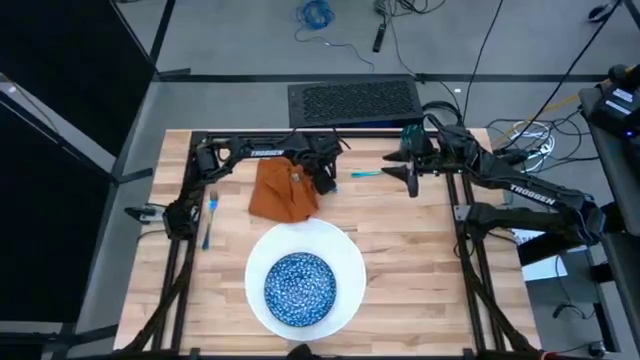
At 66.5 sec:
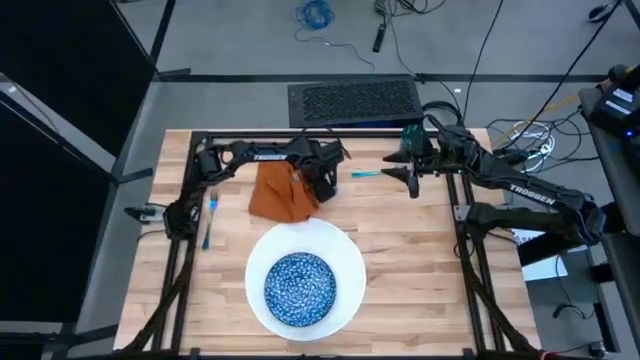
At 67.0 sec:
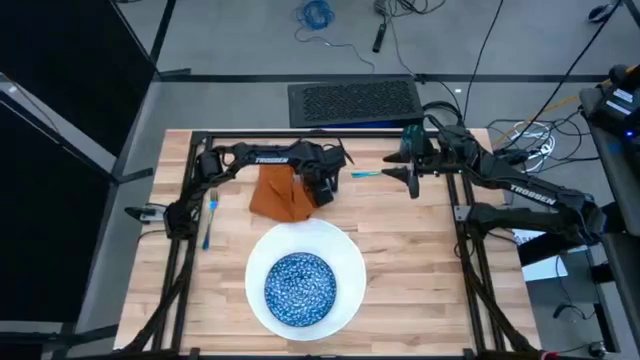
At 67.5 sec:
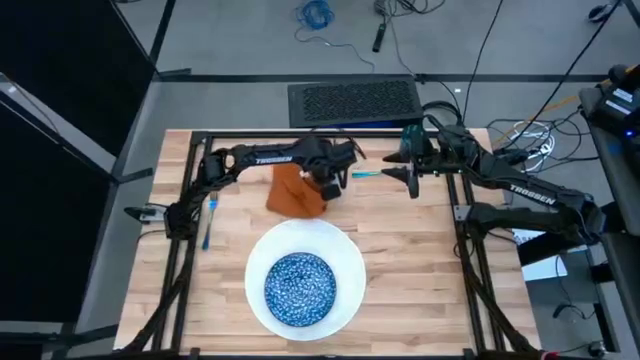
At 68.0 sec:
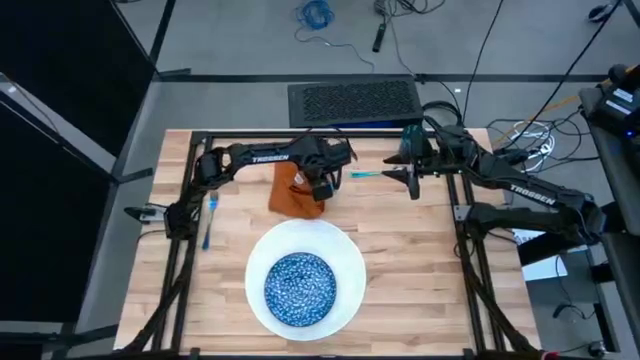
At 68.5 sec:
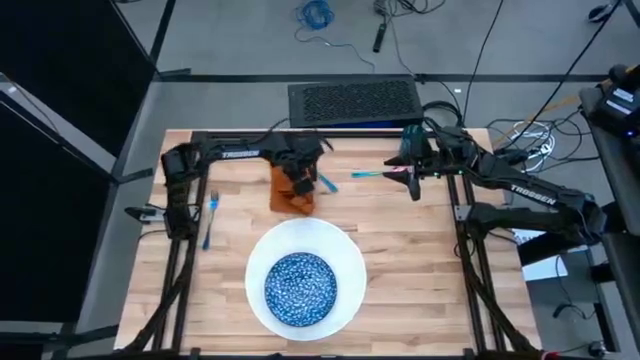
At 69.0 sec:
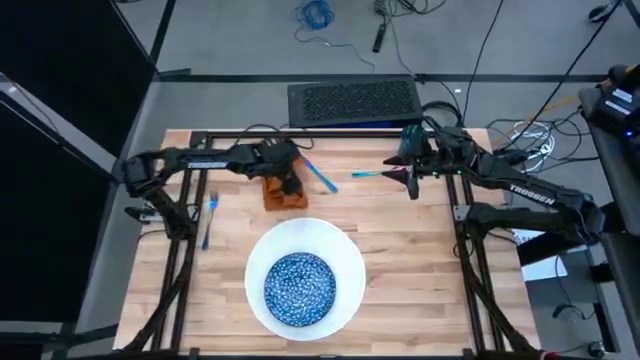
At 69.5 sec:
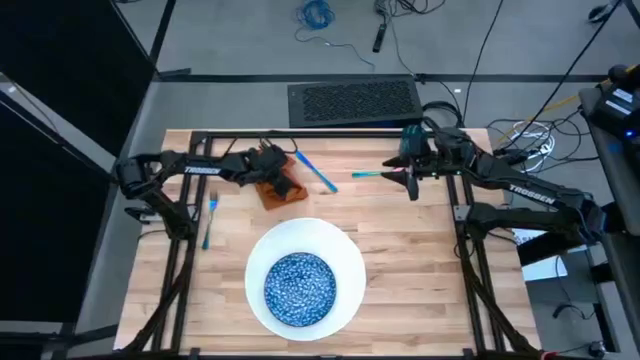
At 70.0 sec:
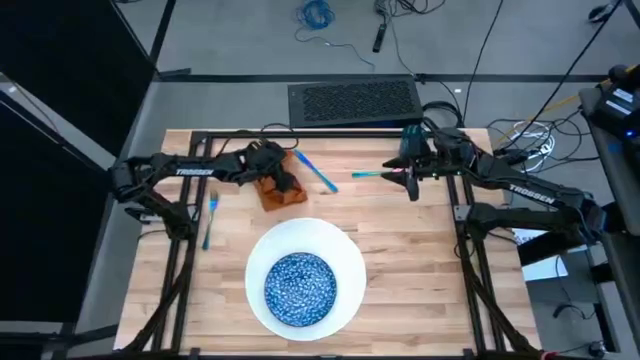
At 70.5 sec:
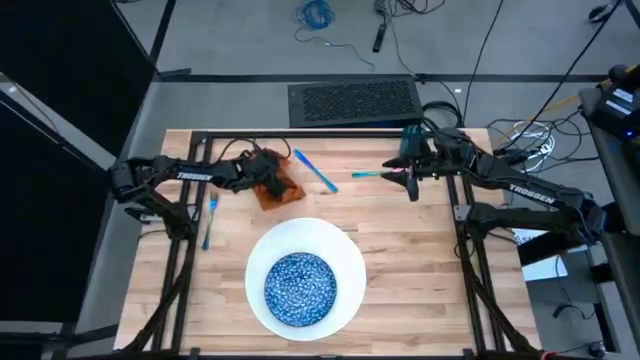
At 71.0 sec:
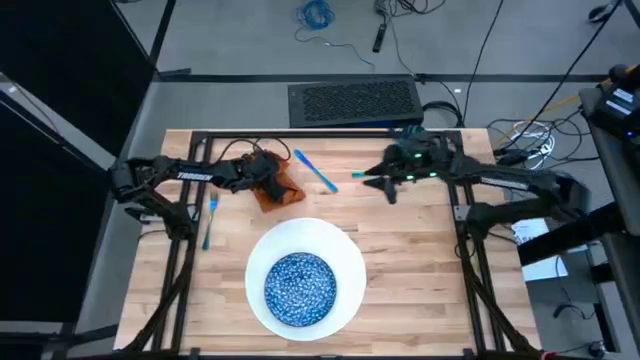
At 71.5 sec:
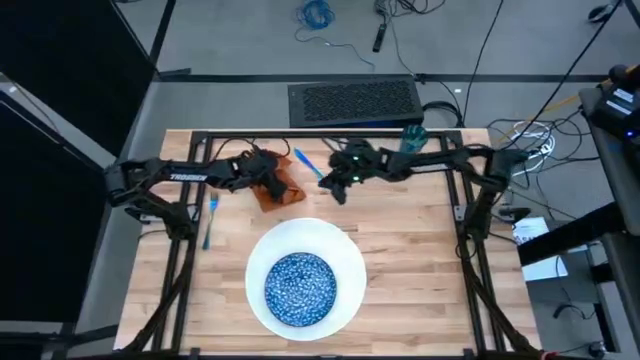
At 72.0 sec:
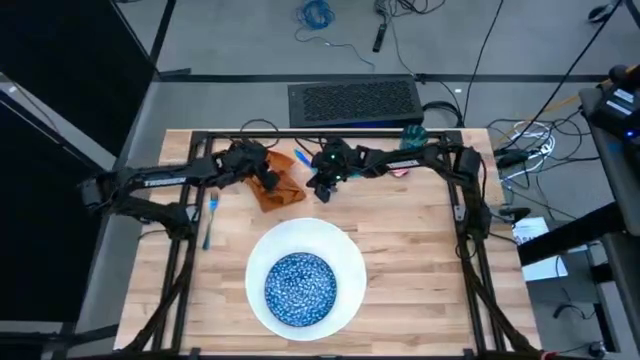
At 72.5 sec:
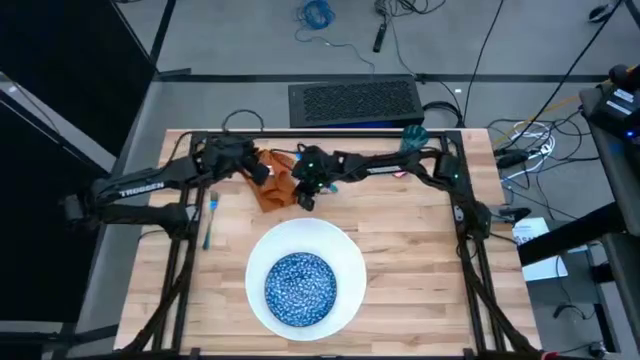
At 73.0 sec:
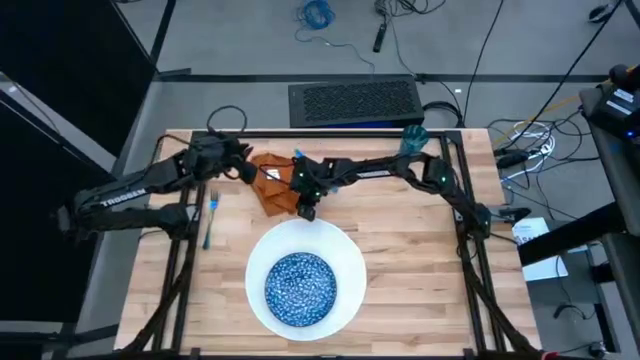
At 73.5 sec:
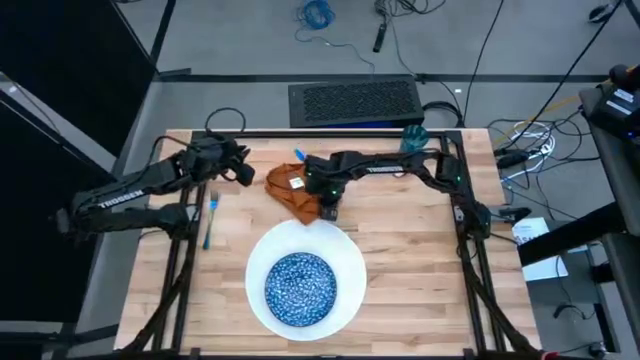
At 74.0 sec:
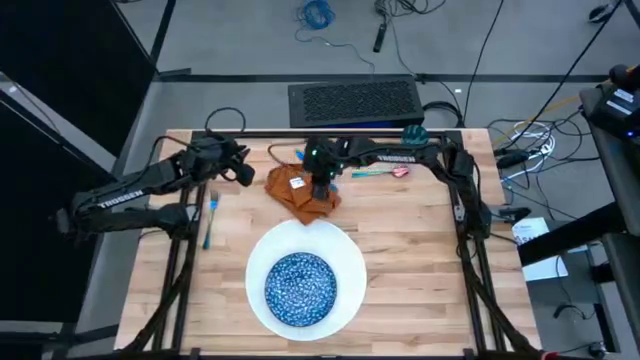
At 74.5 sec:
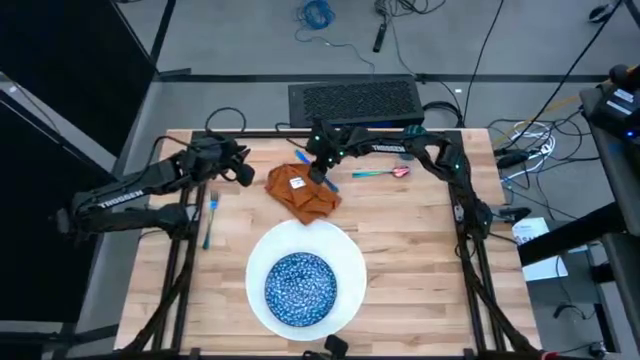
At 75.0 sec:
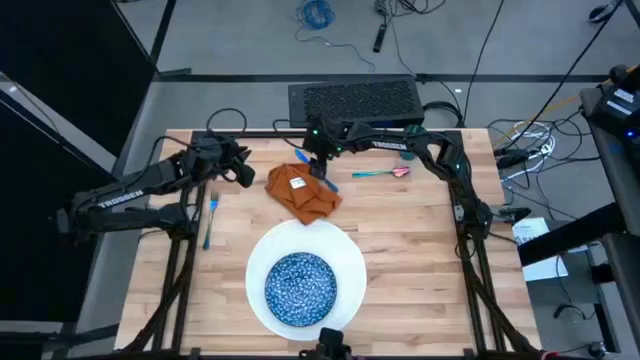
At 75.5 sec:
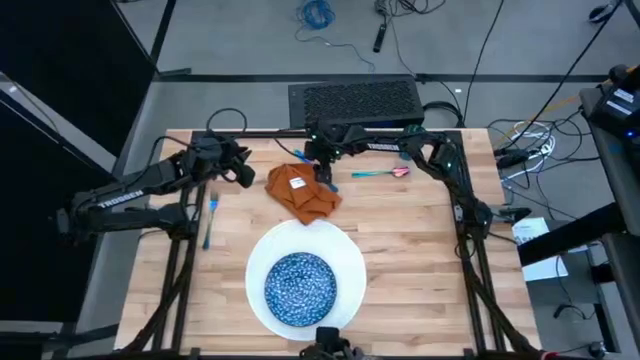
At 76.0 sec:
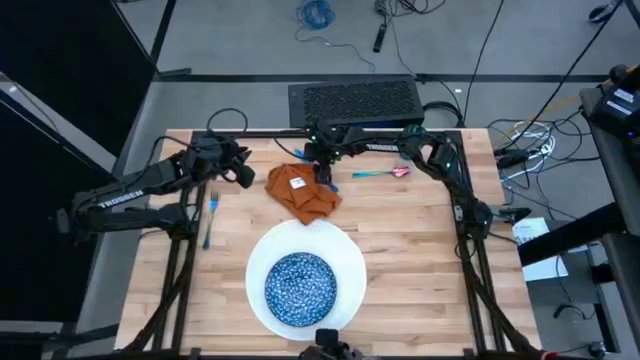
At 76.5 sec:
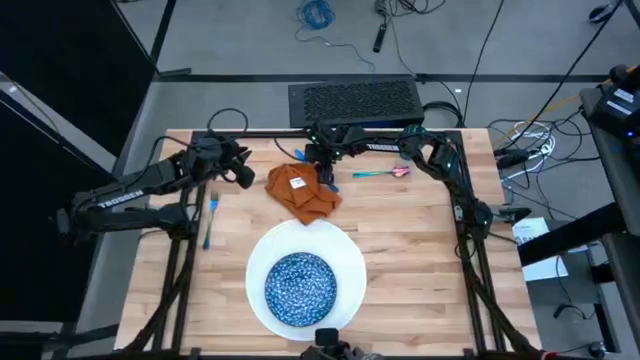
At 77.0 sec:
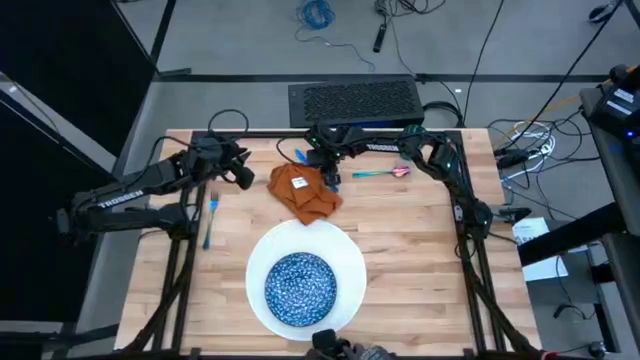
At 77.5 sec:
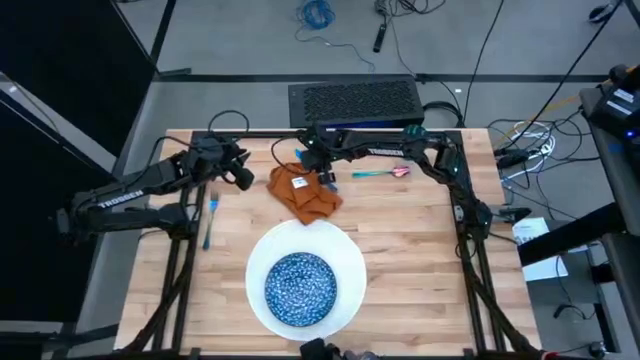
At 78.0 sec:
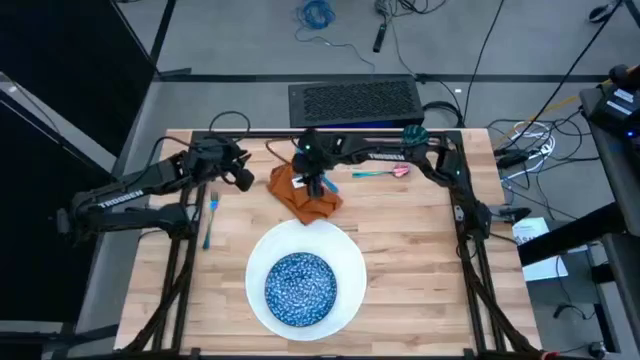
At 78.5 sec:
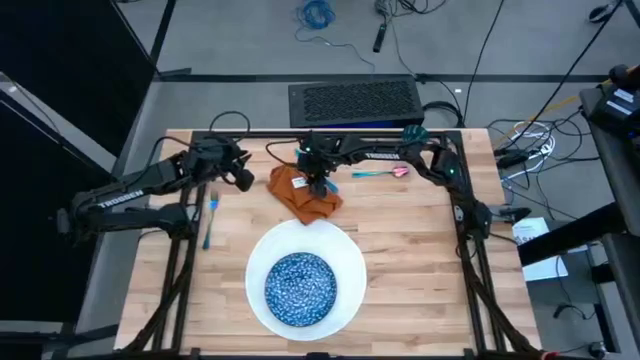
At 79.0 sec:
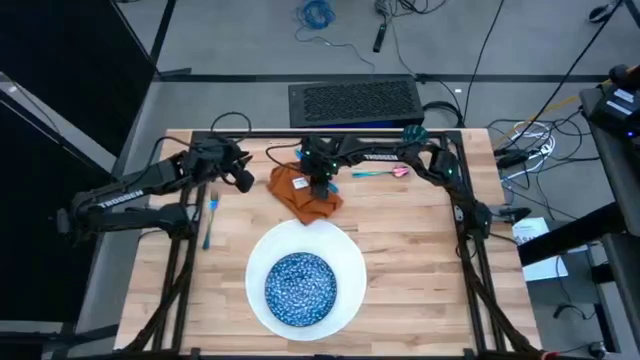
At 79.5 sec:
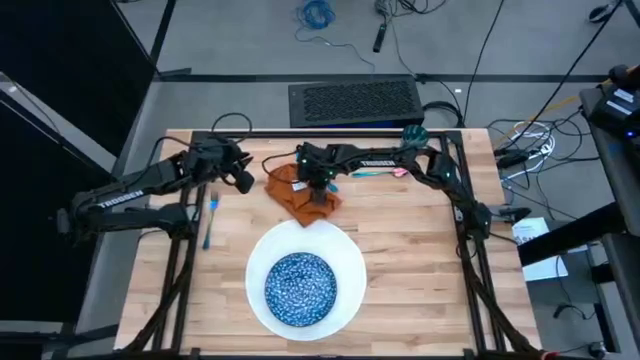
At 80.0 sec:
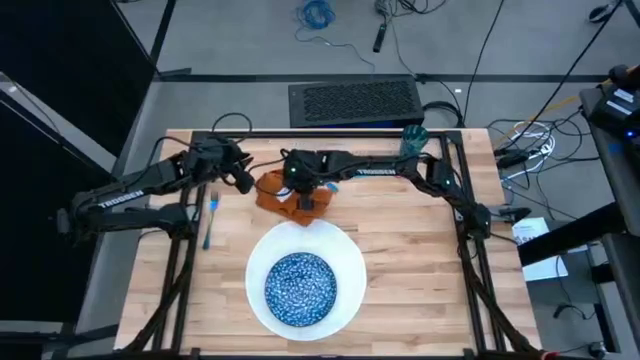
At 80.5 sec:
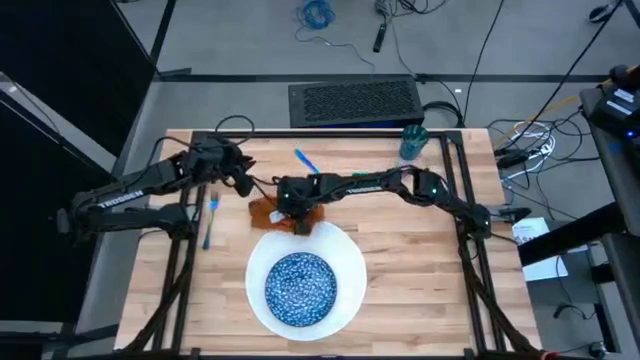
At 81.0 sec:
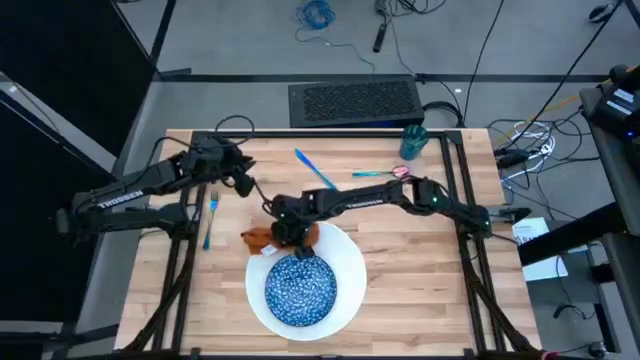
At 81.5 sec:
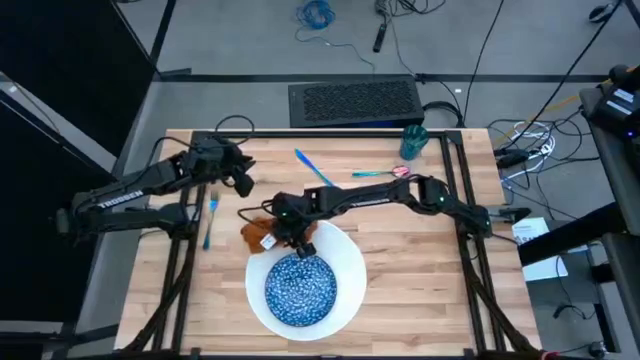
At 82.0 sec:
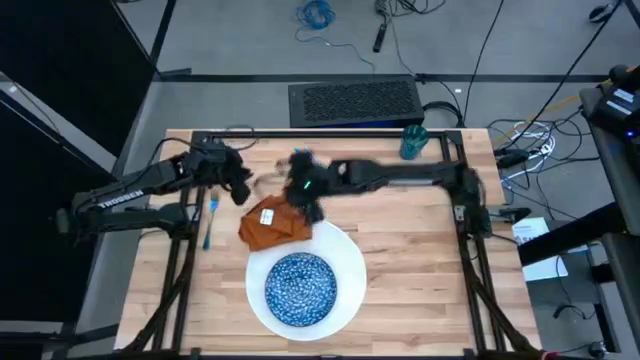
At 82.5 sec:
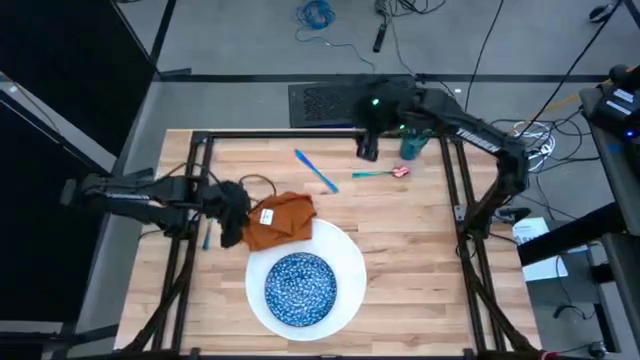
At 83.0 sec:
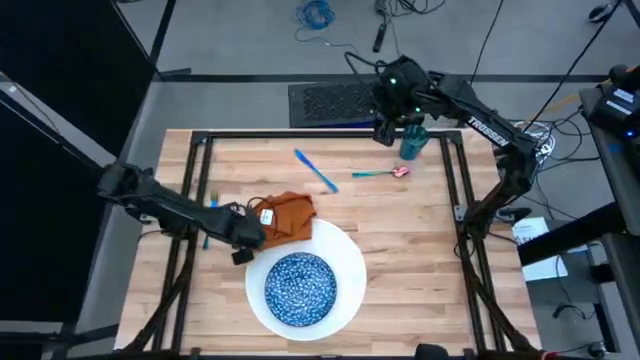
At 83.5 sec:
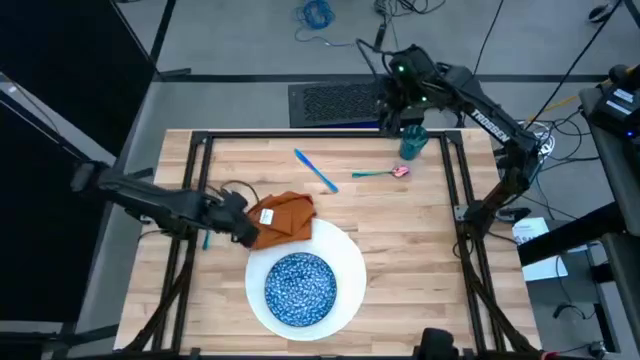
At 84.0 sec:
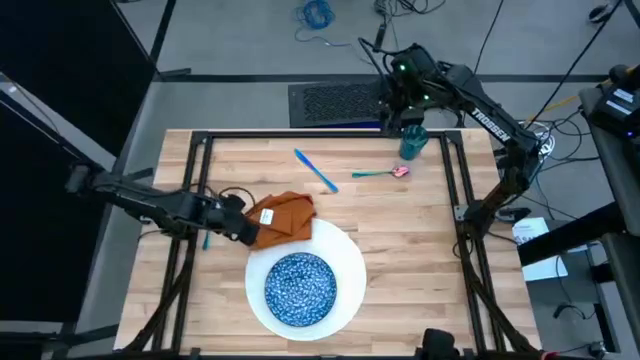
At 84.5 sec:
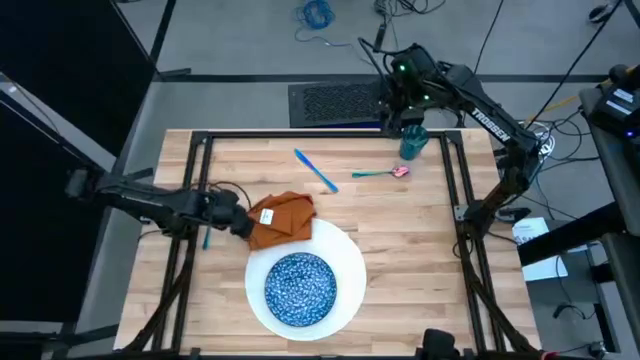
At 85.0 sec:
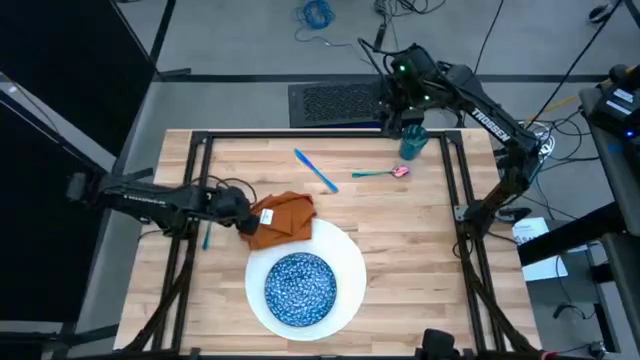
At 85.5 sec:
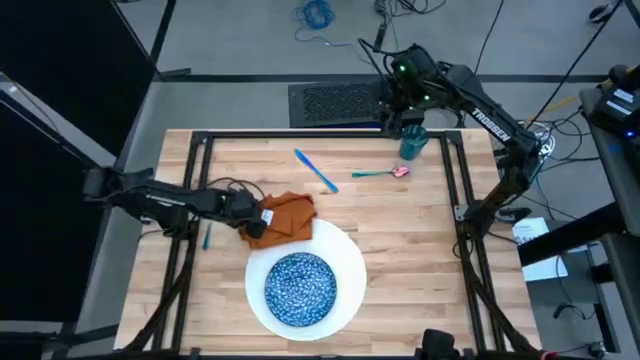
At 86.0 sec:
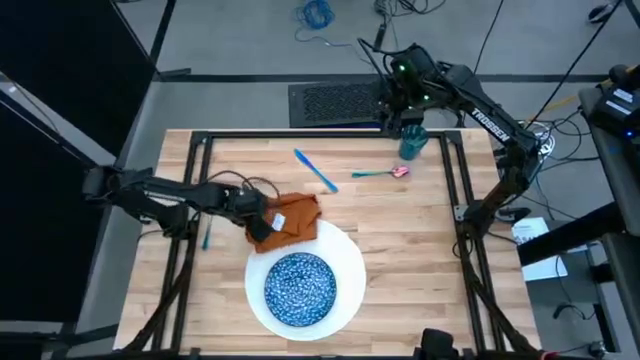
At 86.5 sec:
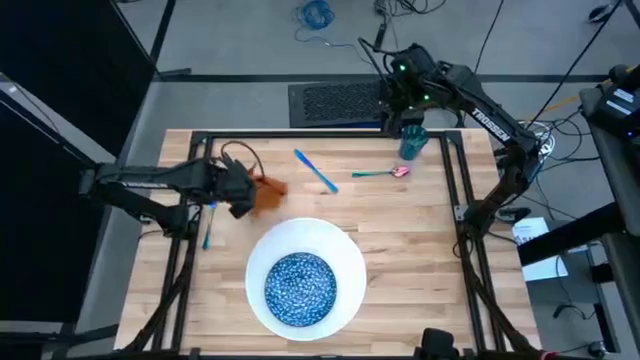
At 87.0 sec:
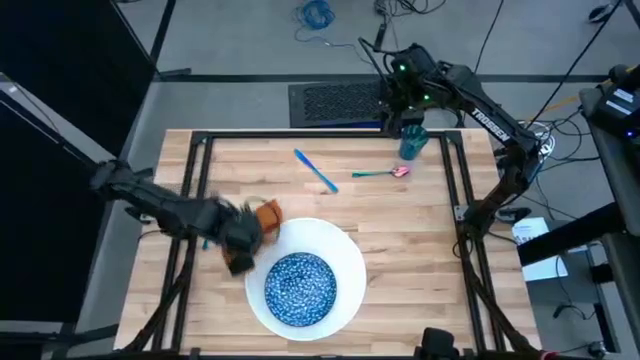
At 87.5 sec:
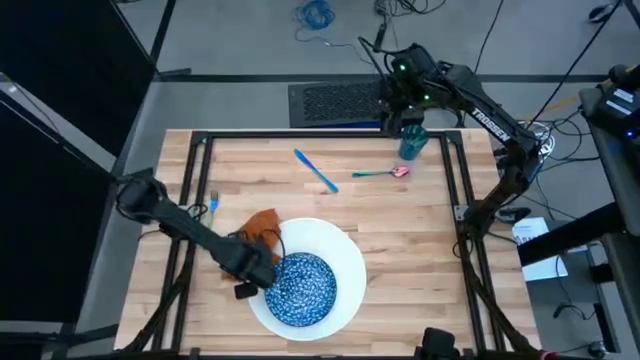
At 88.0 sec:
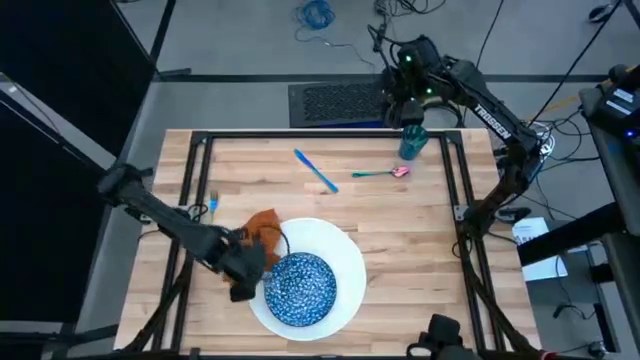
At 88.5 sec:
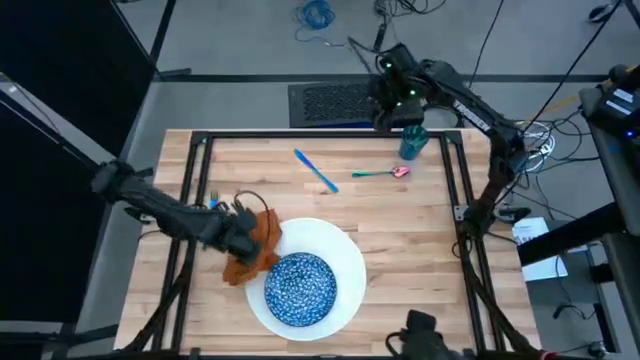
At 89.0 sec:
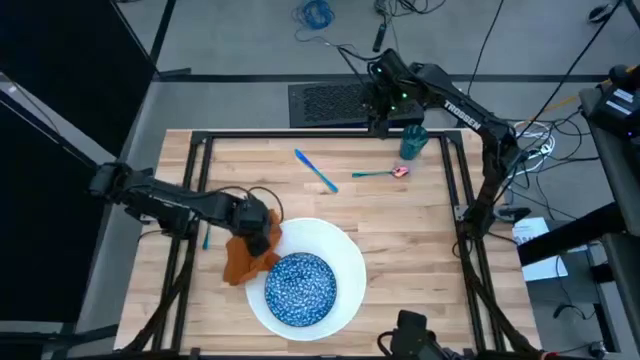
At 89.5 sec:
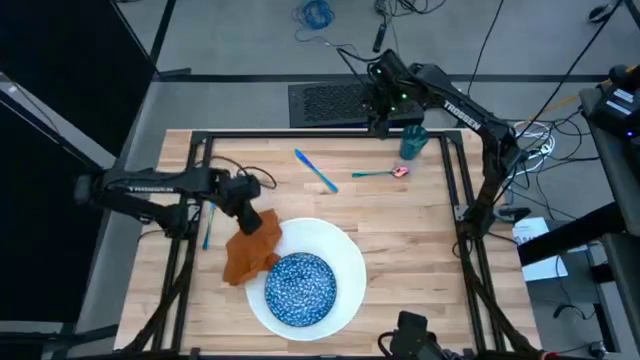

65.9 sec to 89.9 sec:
Task: Set table place
Fold the orange table napkin
